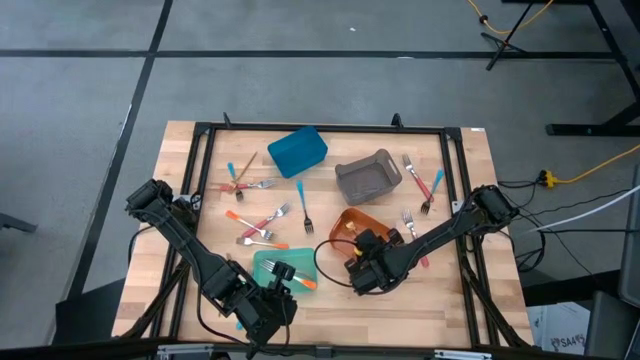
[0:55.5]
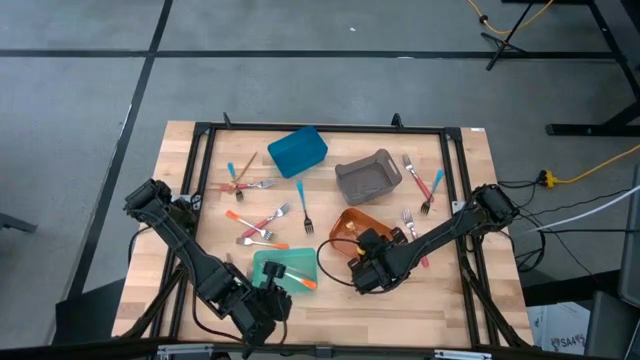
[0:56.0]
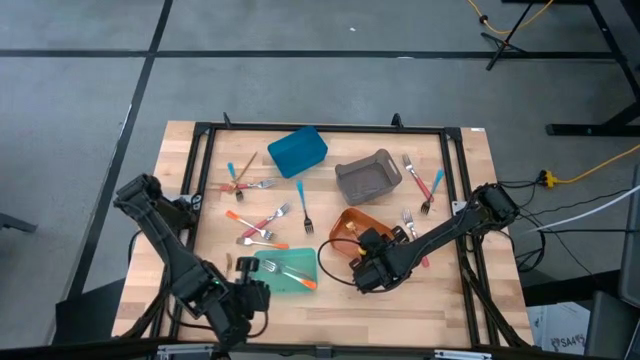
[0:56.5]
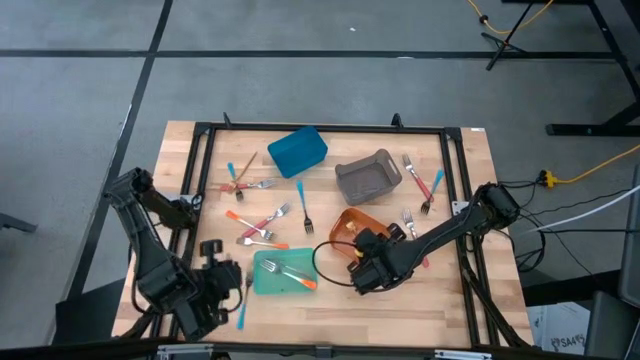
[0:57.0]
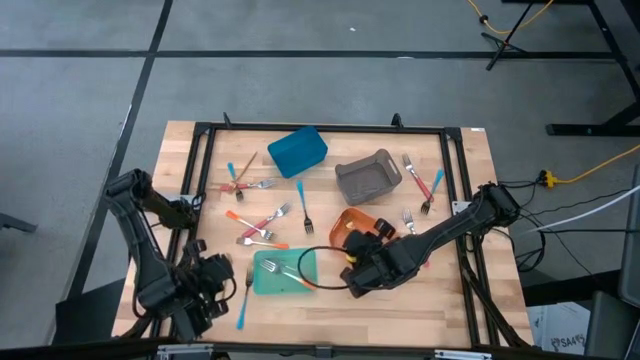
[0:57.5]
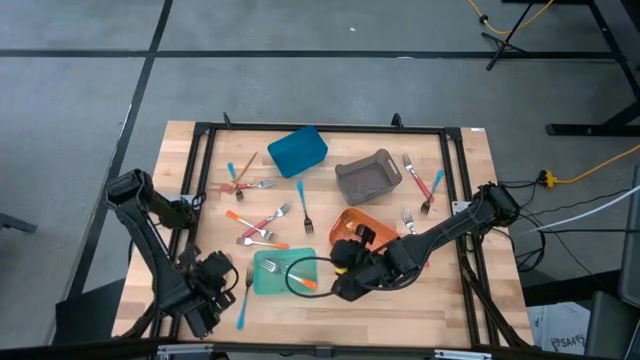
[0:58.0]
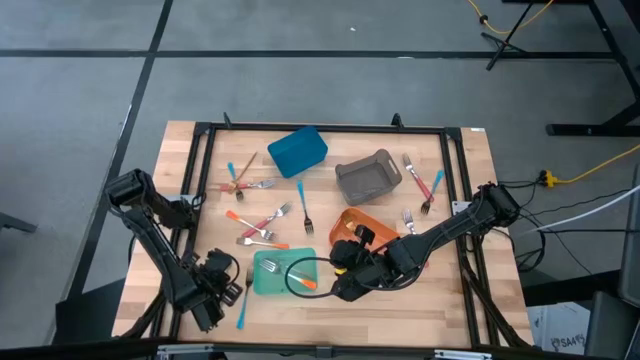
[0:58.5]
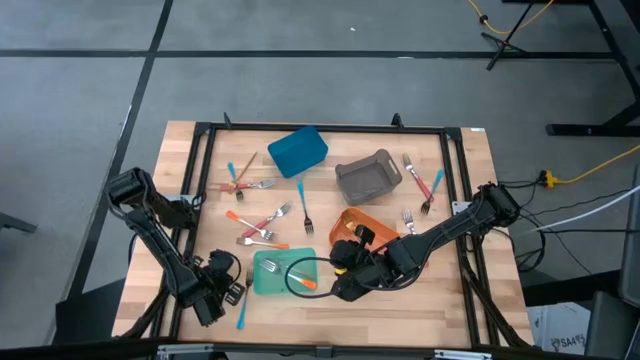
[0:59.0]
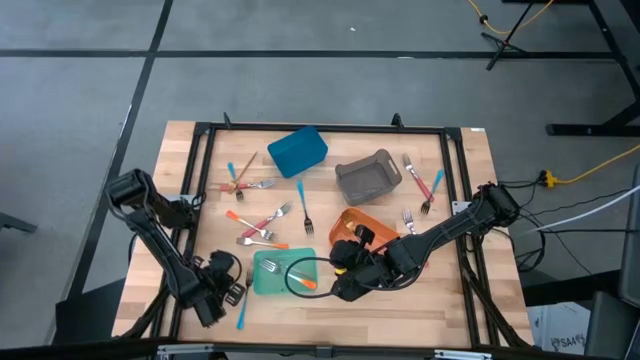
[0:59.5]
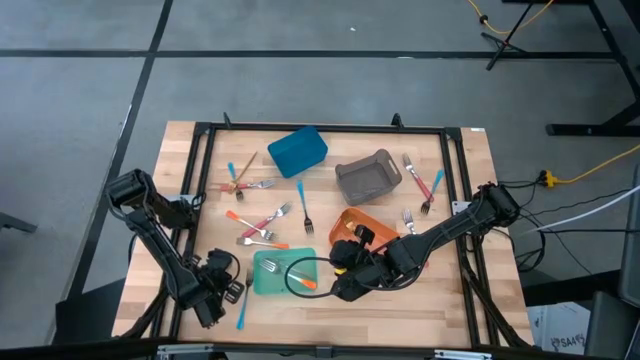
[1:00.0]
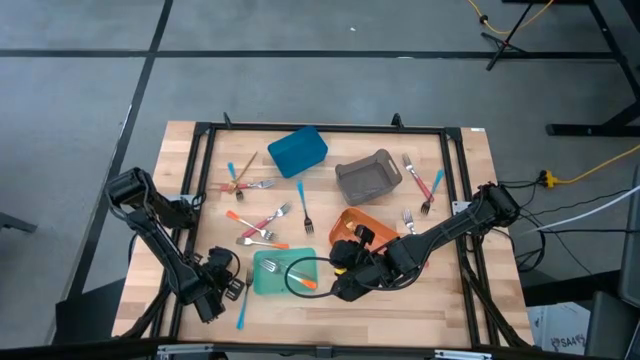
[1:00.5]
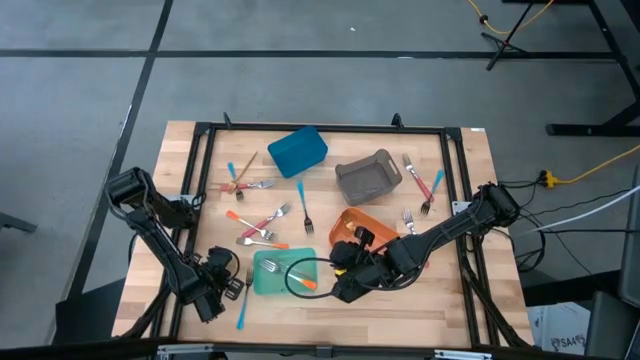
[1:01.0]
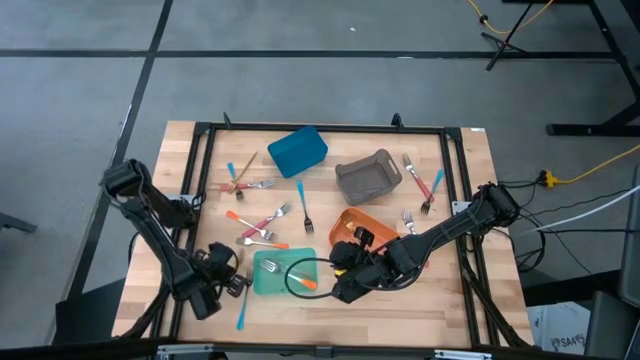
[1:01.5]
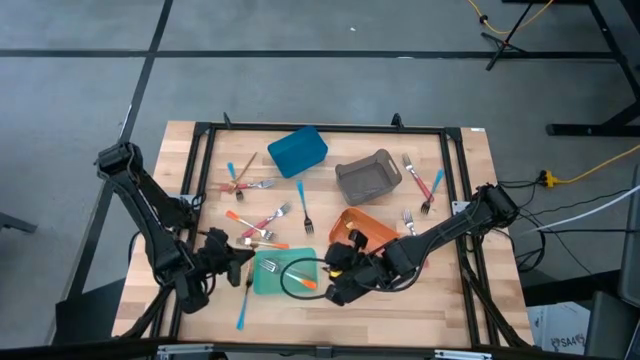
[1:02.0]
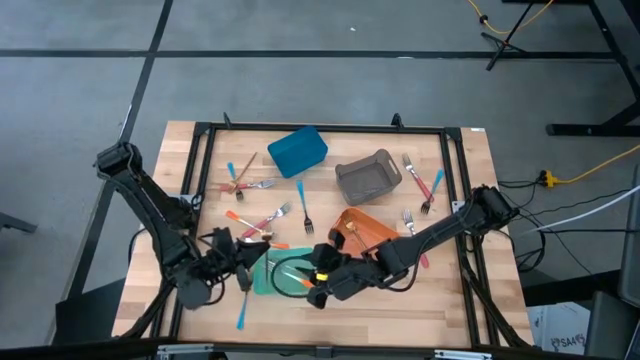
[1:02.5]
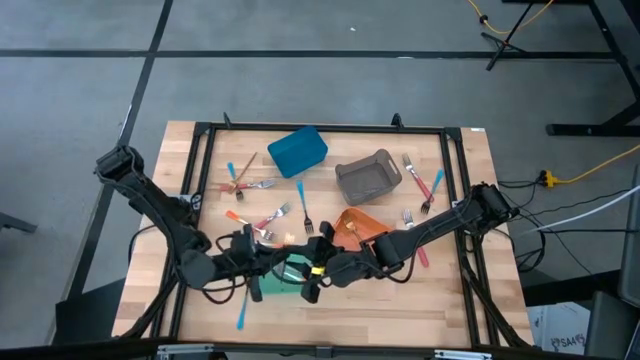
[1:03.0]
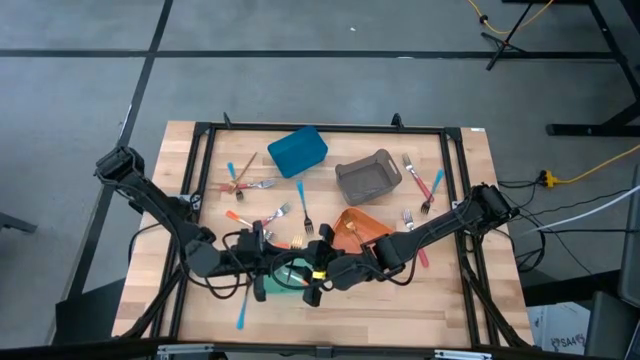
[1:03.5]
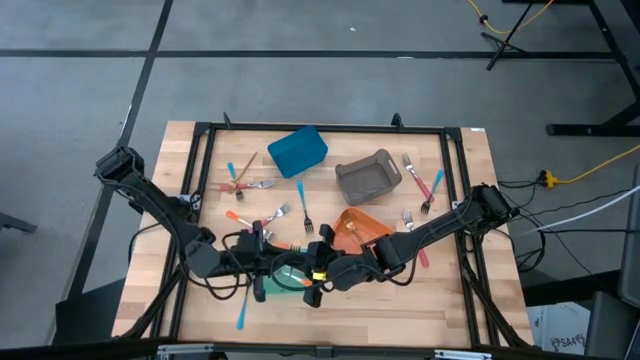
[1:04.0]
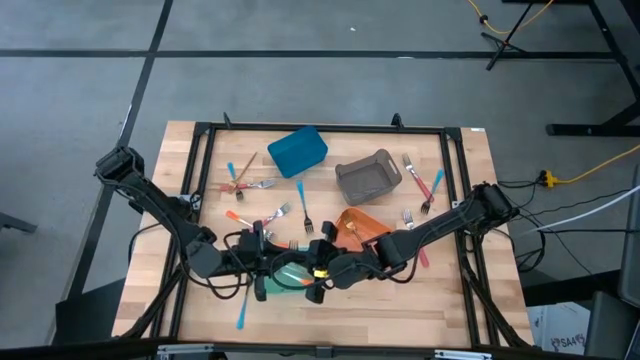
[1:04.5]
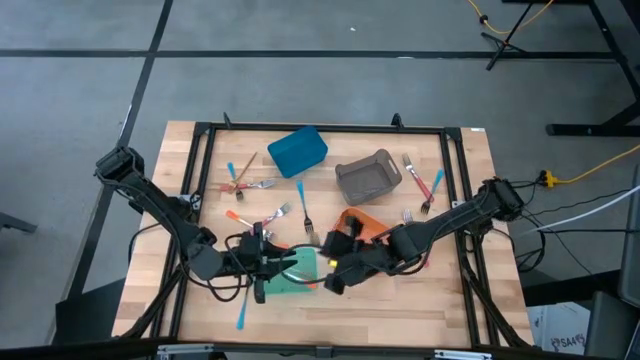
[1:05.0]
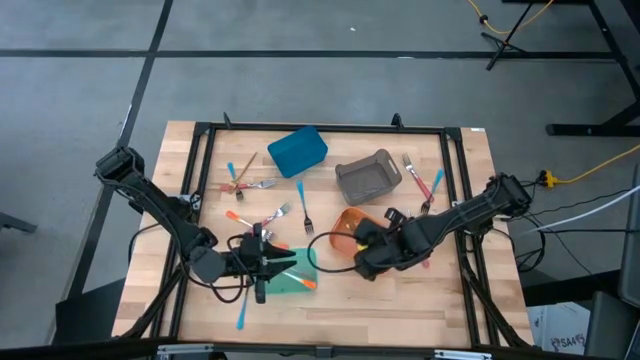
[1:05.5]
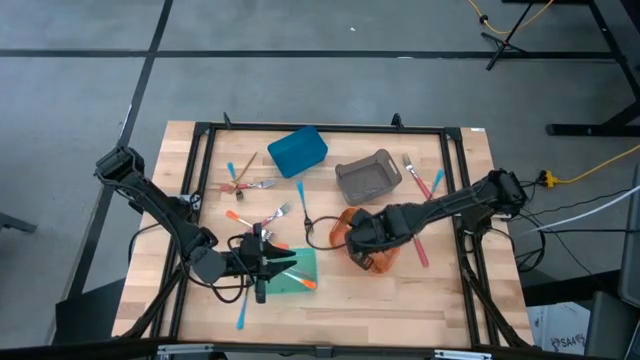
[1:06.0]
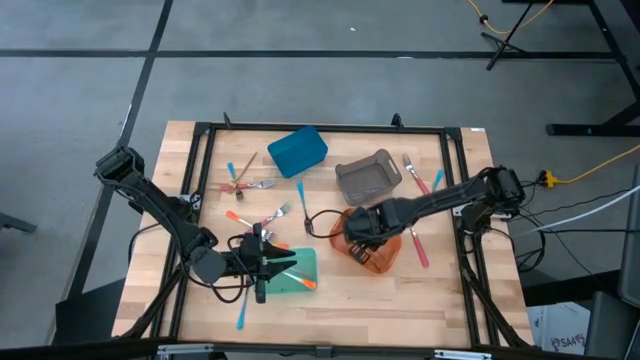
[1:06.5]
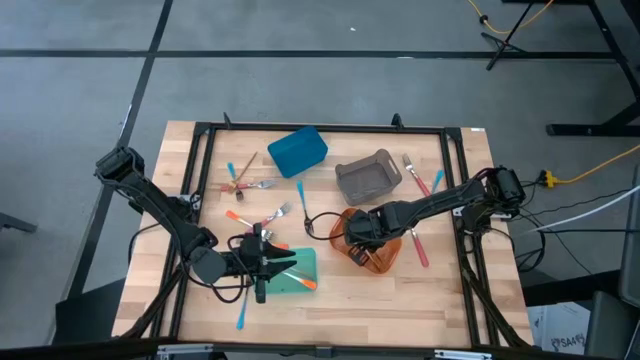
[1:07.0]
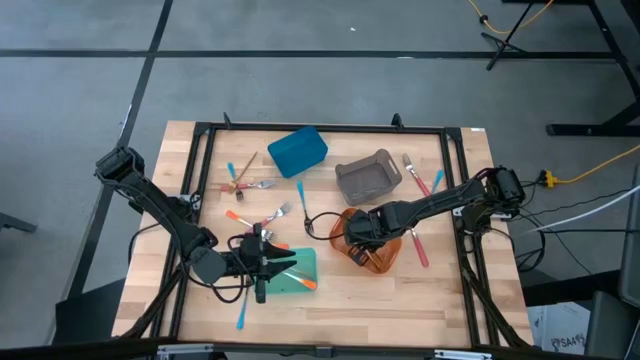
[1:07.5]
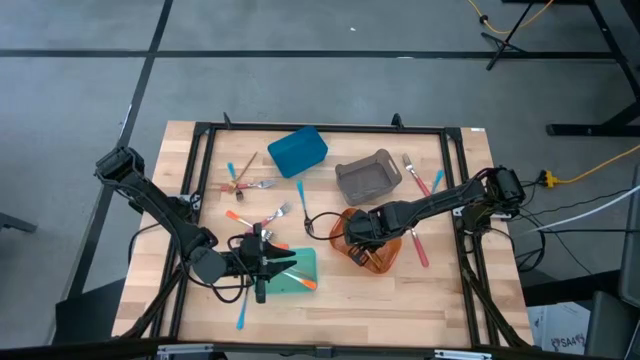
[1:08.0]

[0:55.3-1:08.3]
Task: Sort silverware by color (type)
Put the gold fork into the orange bin

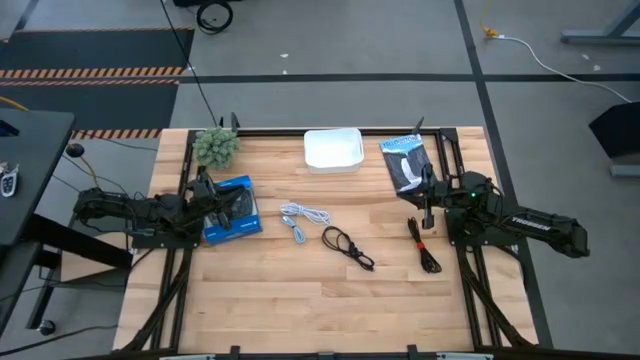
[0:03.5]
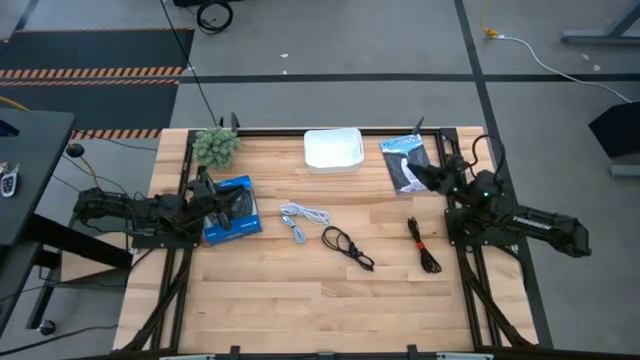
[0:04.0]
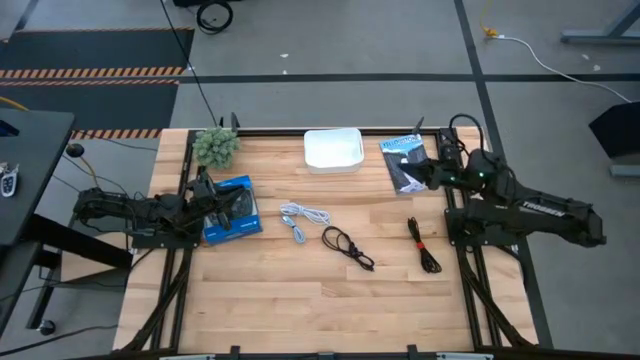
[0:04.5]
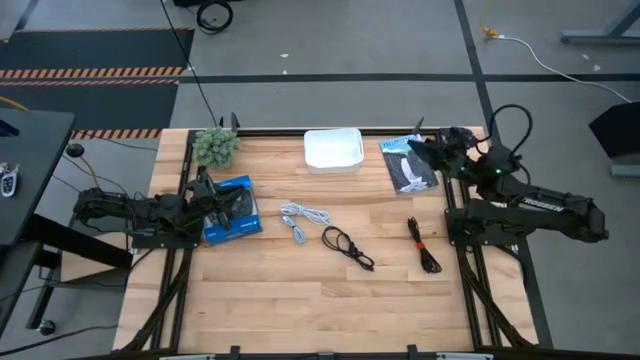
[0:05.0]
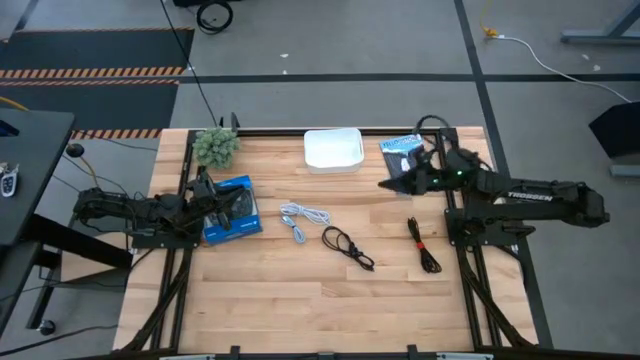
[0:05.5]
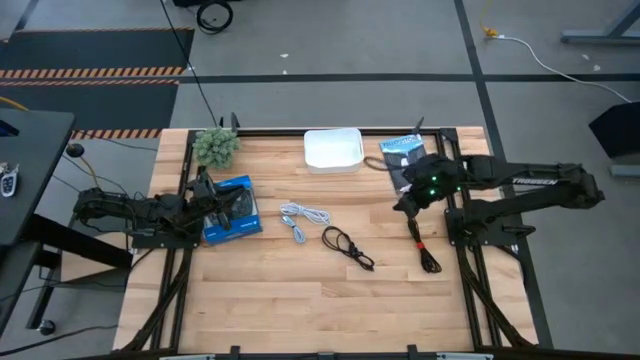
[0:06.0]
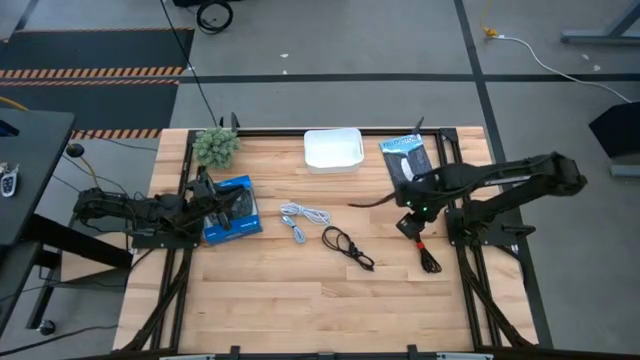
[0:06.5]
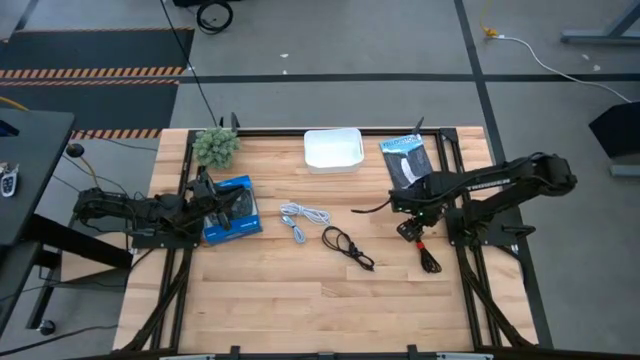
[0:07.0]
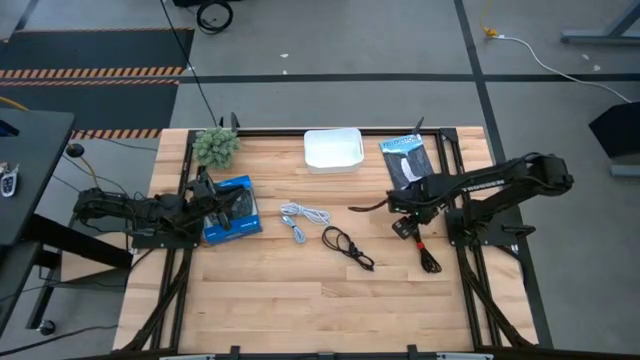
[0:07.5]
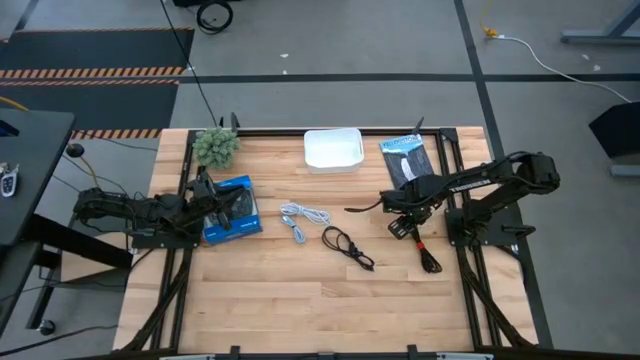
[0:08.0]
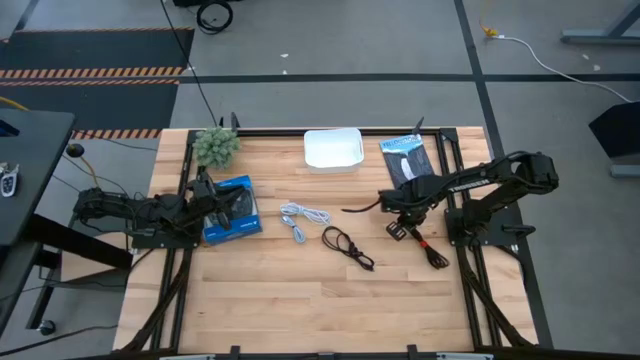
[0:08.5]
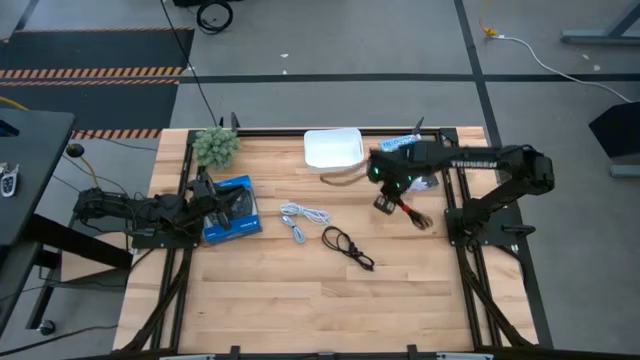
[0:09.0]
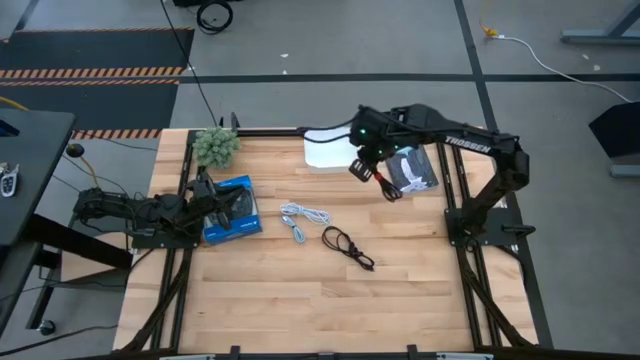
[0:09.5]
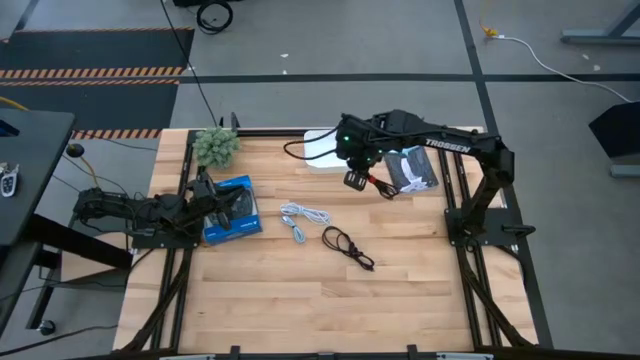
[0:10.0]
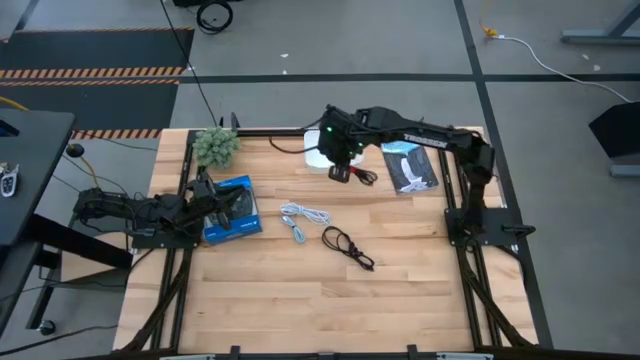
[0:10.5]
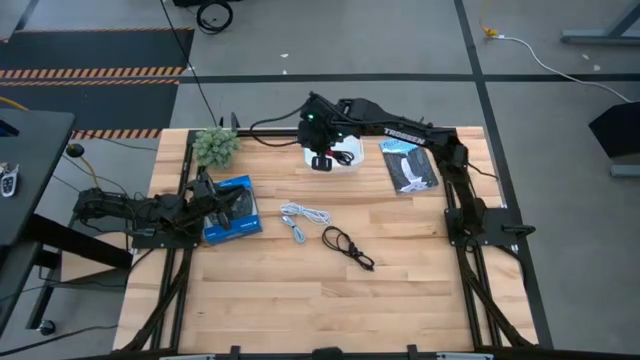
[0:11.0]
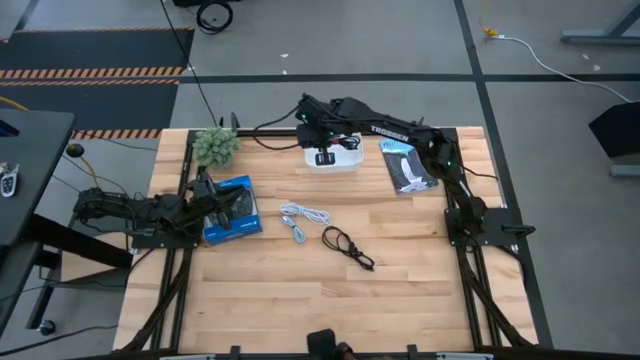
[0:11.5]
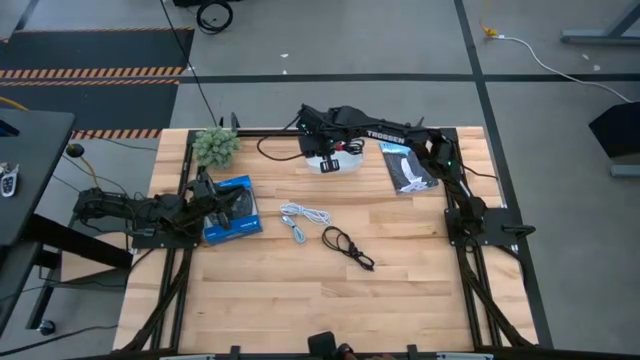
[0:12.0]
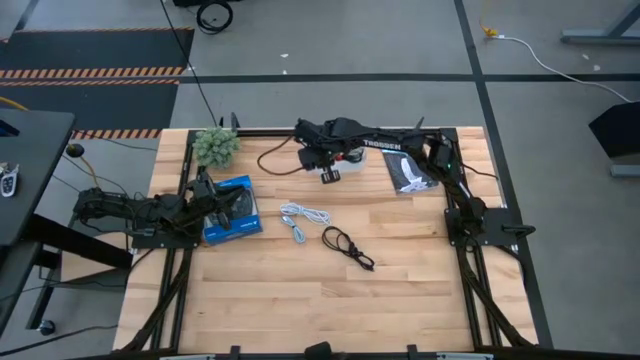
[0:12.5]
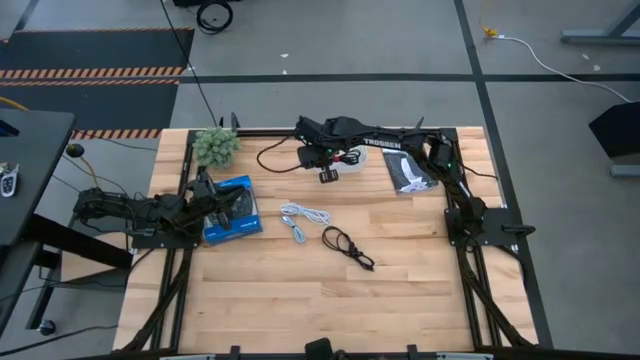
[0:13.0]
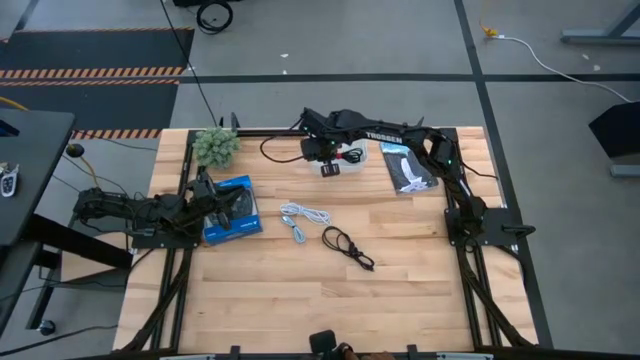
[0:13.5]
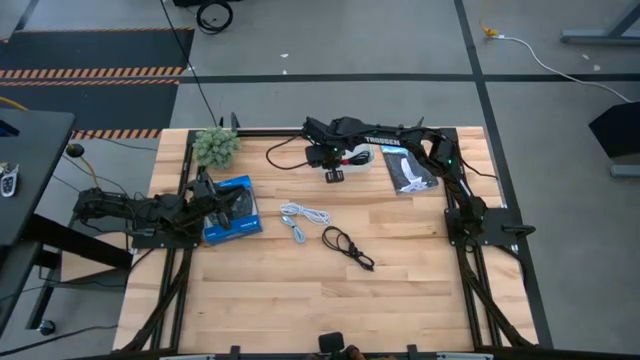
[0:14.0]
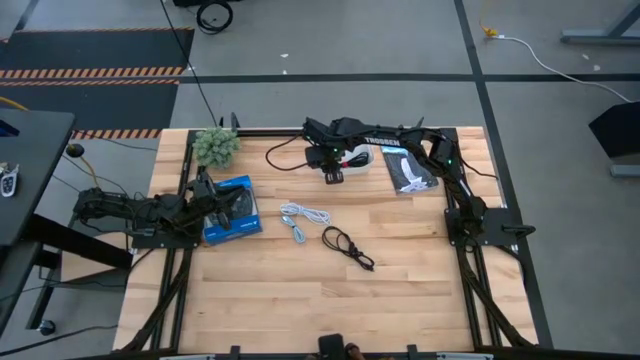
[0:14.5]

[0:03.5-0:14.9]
Task: Pick and place USB-C Cables
Put the right black USB cable into the white bin
